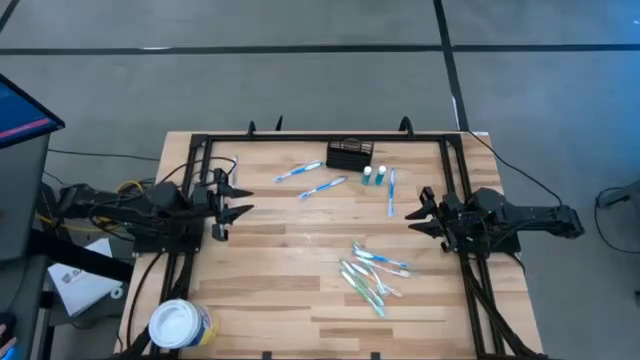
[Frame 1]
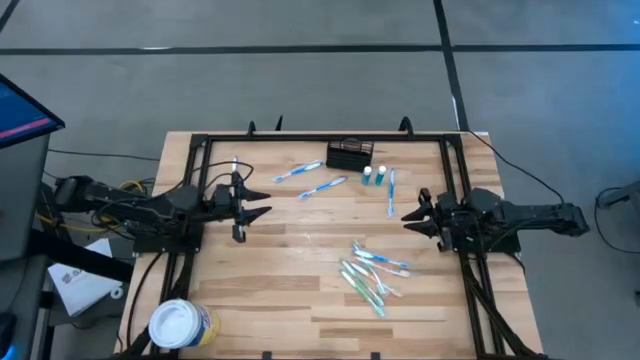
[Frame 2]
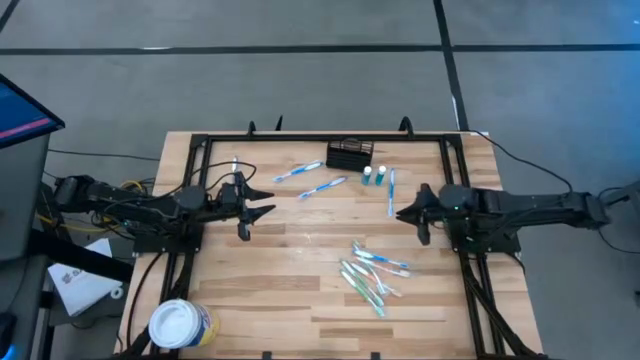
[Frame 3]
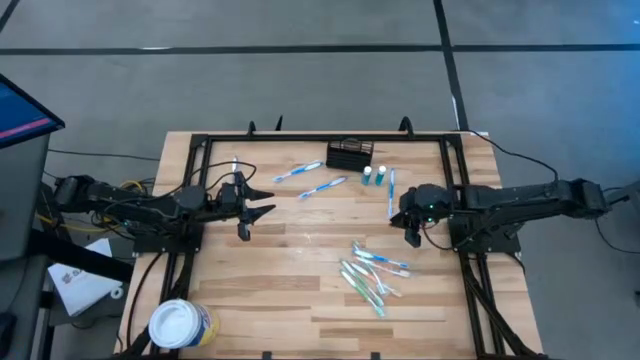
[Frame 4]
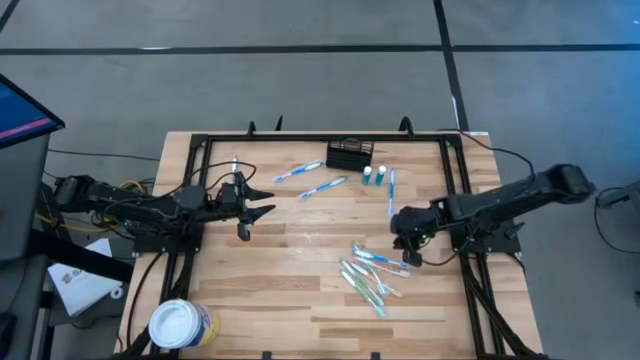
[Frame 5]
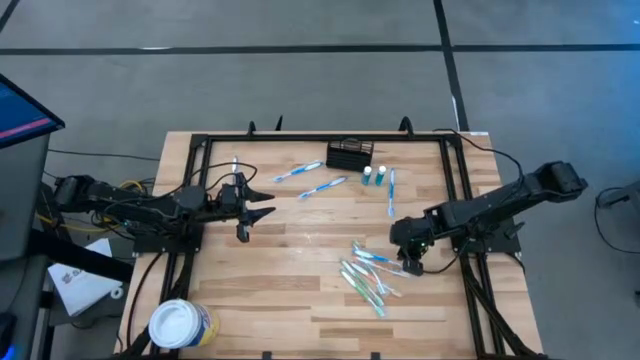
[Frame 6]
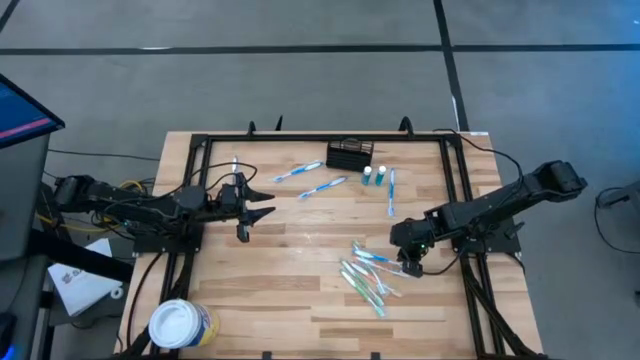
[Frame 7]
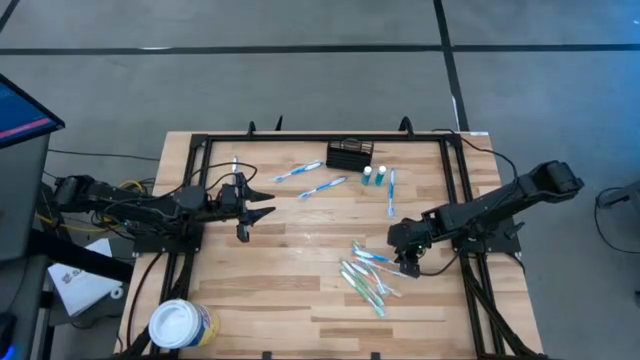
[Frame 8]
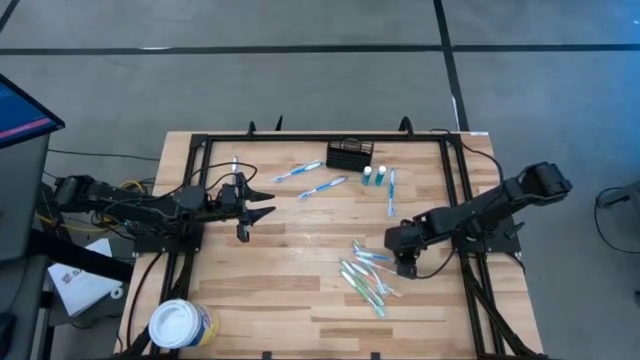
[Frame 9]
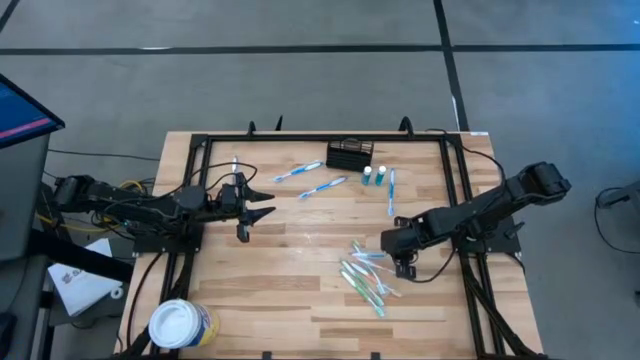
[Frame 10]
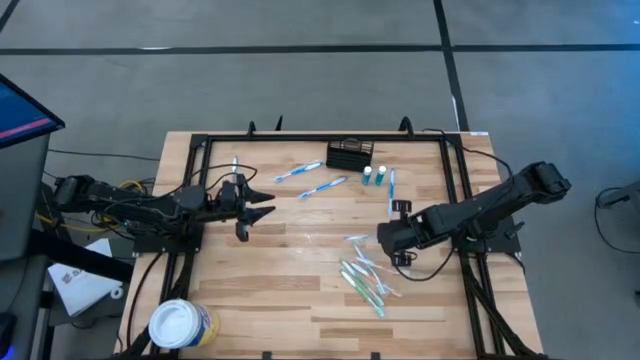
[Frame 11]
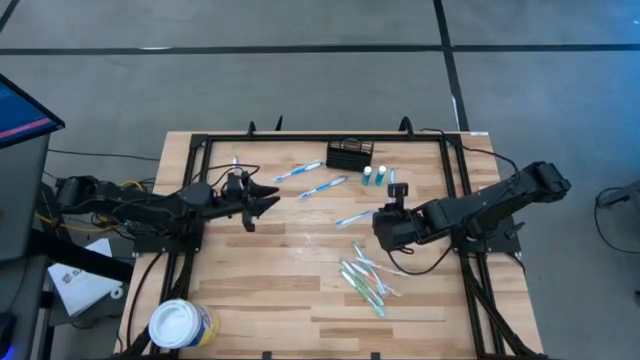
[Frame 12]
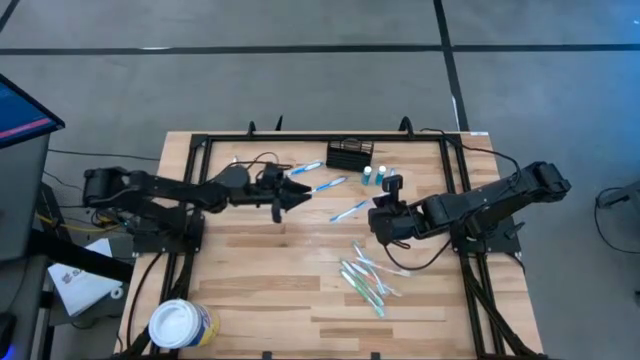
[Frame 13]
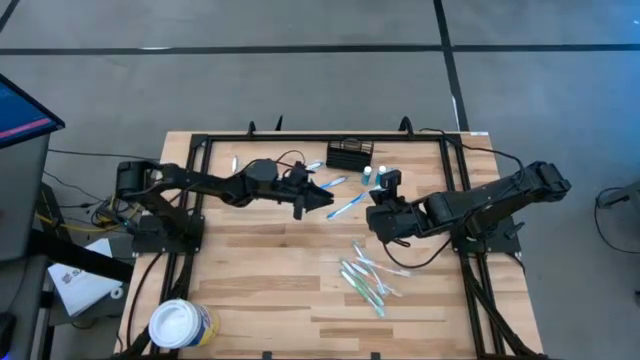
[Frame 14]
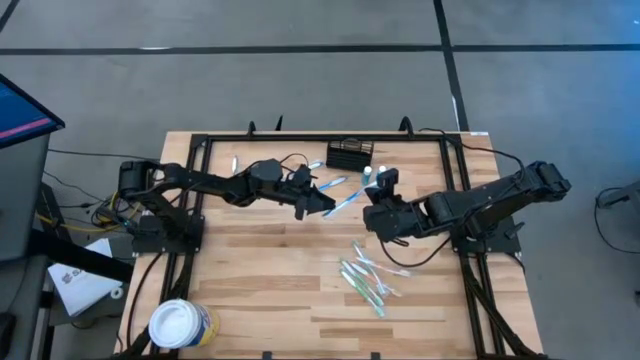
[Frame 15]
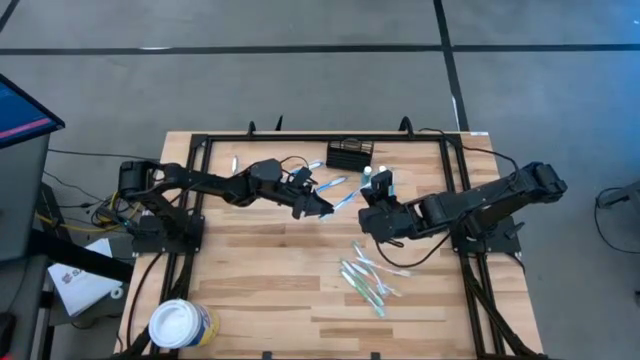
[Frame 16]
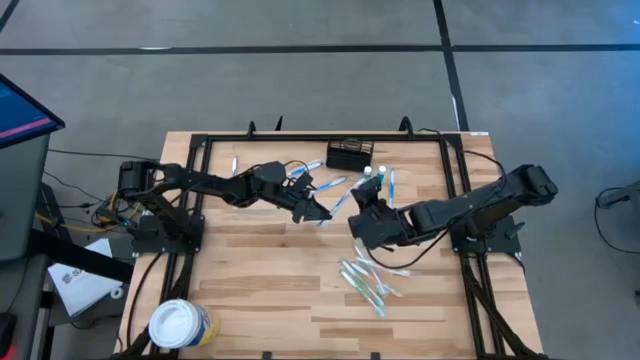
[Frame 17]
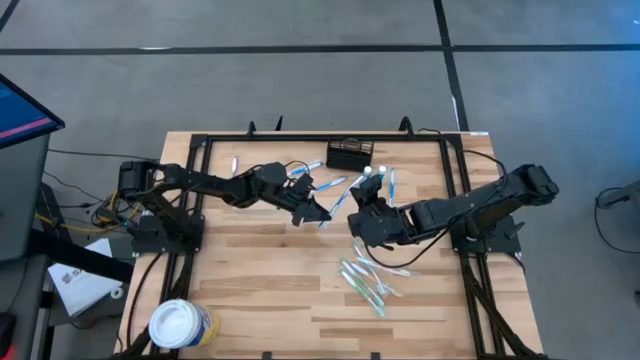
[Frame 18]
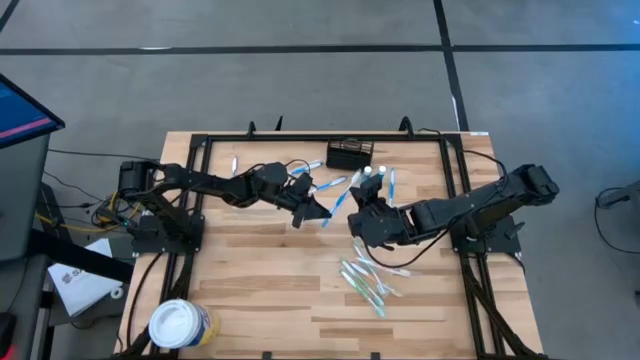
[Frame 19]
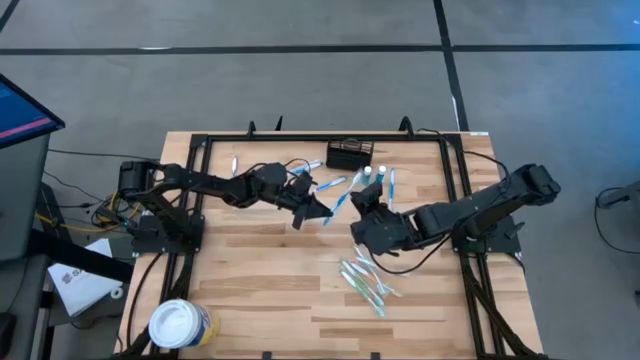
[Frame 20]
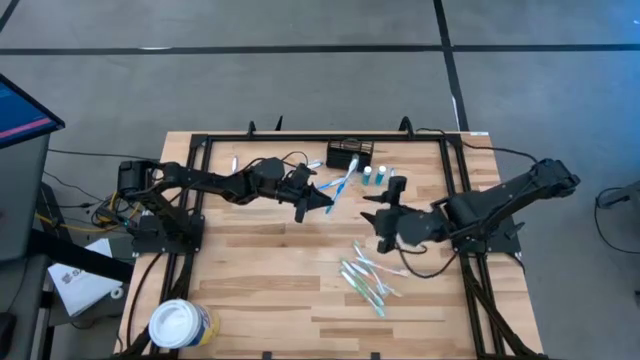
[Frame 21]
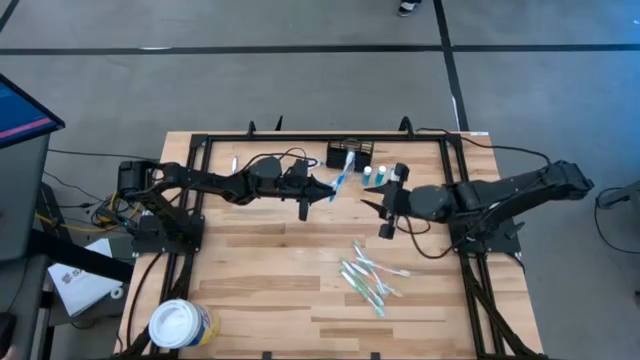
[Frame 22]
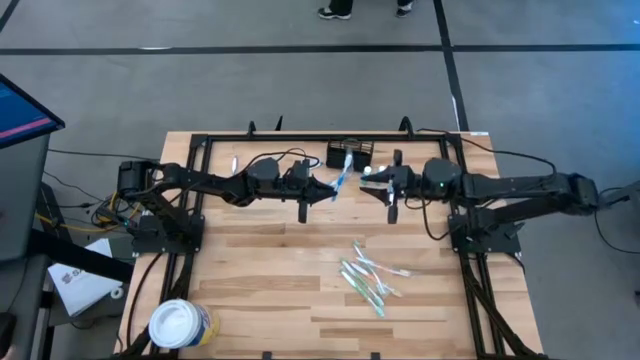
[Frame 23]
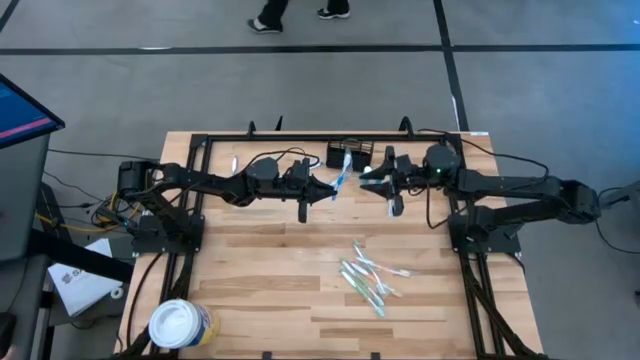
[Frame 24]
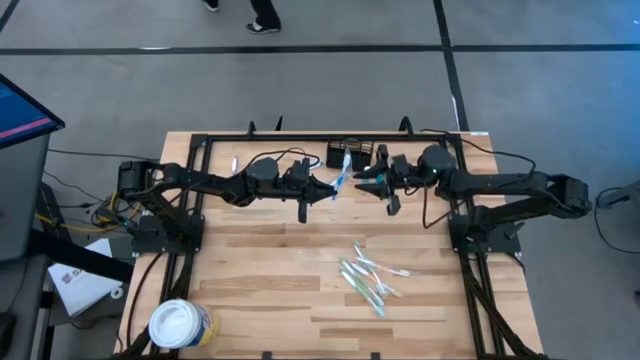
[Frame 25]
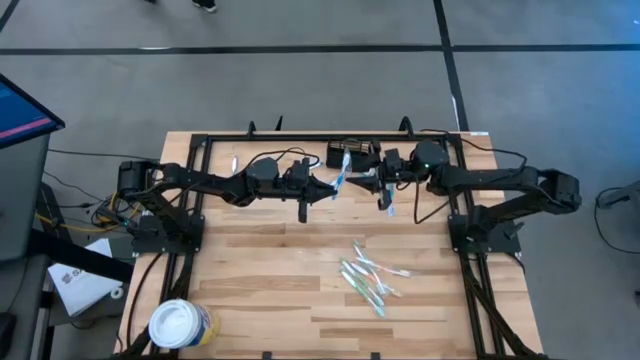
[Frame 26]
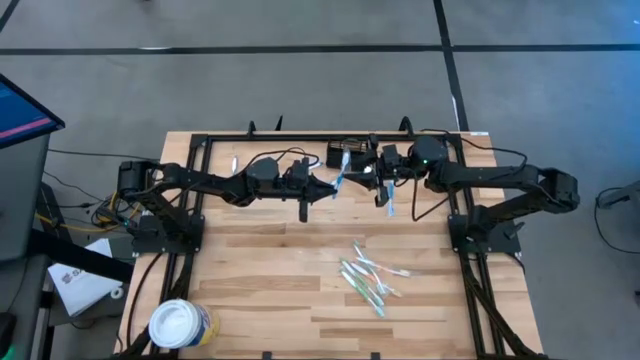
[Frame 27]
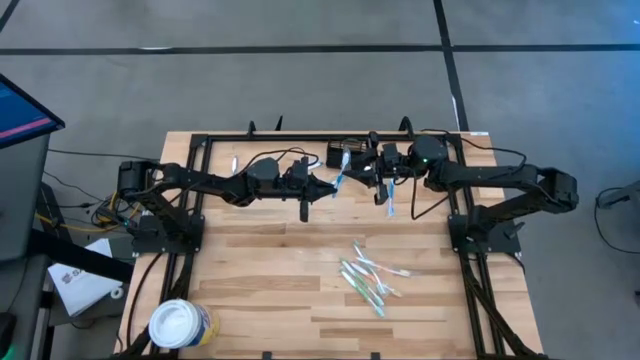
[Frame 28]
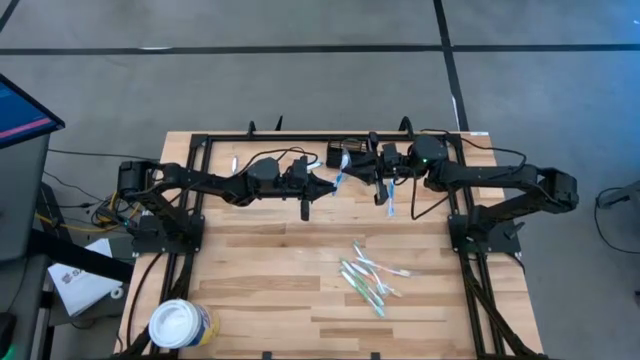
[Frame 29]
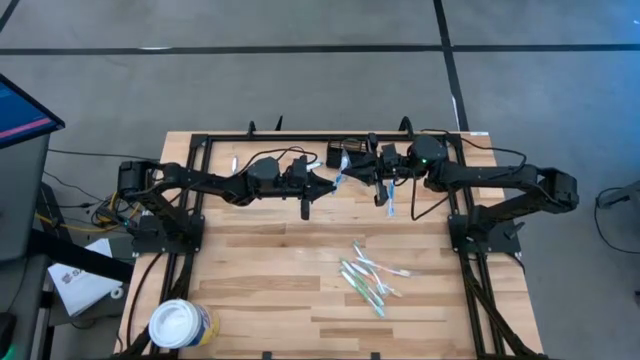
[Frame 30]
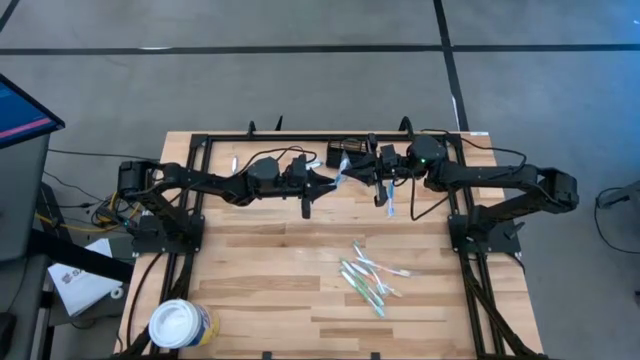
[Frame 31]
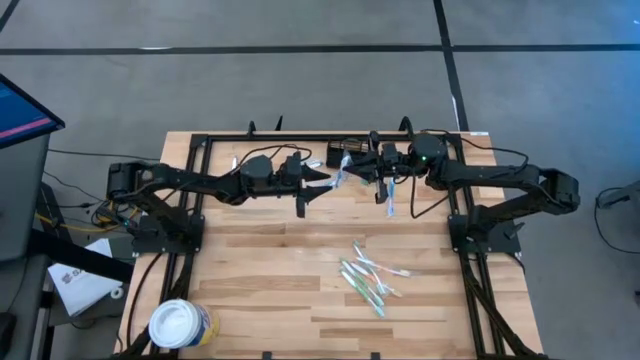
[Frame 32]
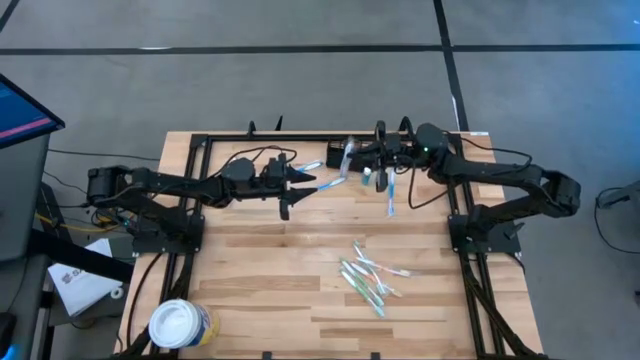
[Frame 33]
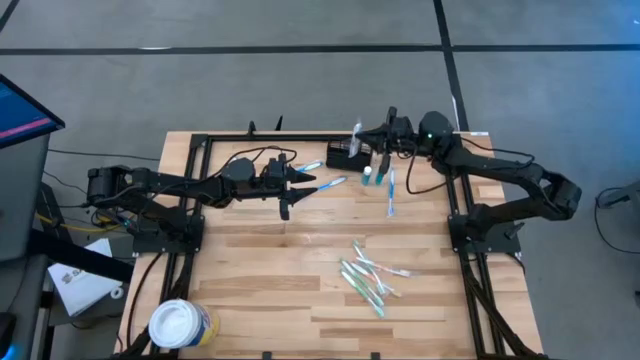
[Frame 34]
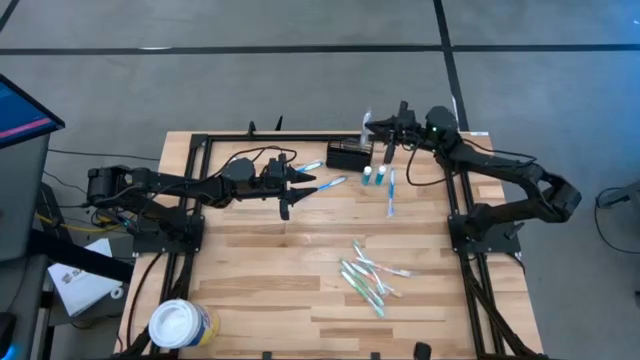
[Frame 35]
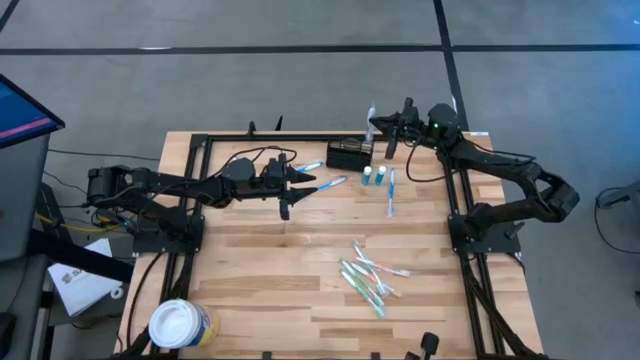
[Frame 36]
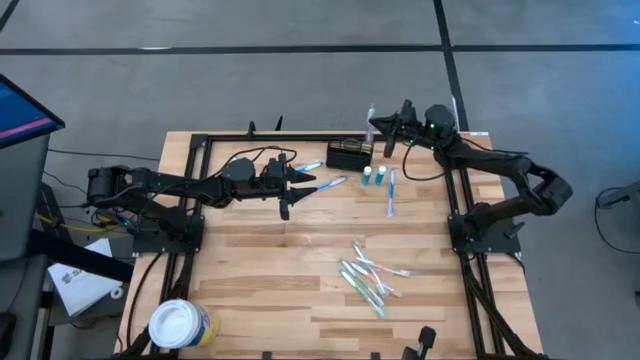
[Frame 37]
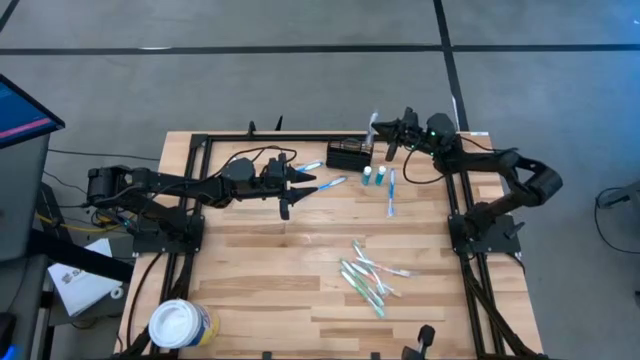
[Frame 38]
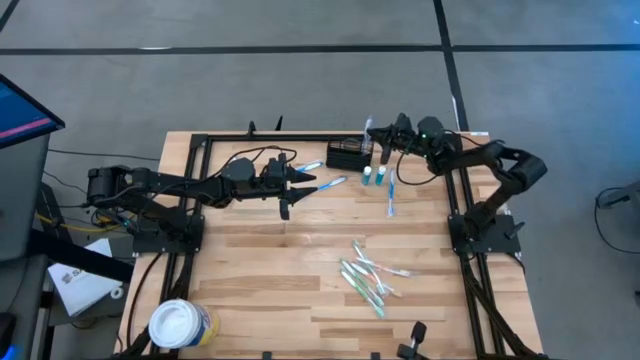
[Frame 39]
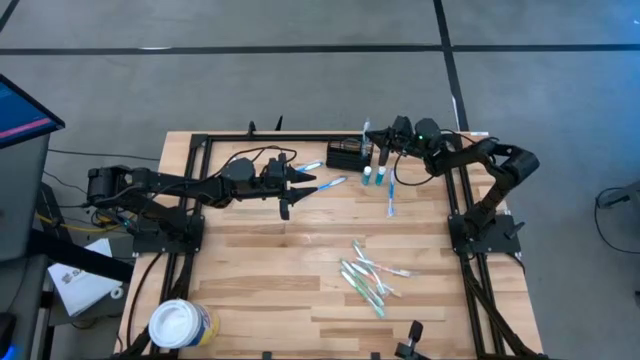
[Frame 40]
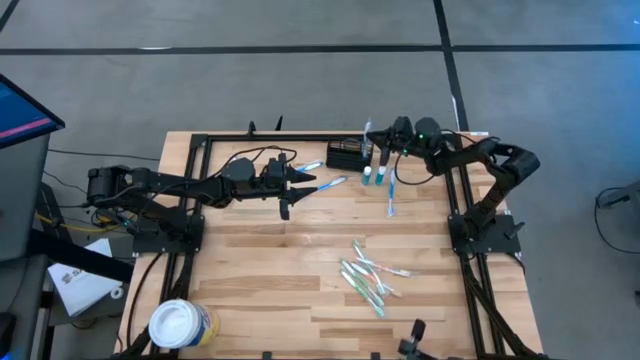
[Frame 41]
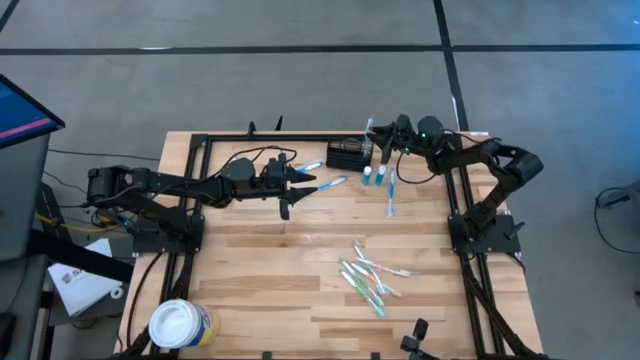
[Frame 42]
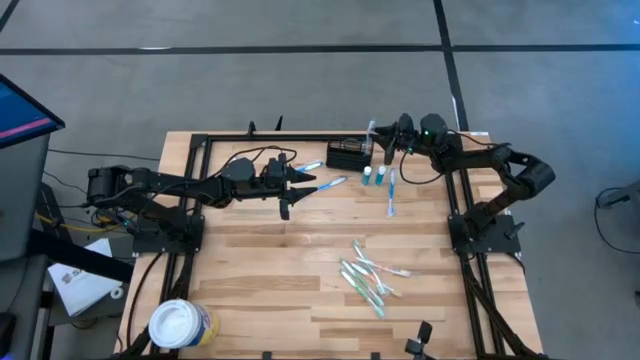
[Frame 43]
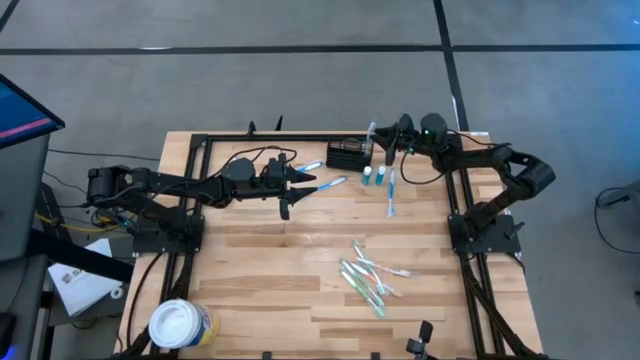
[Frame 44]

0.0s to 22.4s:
Task: Pick & Place toothbrushing station
Put the blue toothbrush into the mesh organizer
